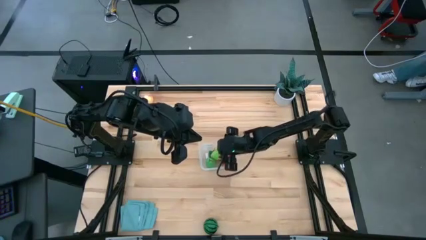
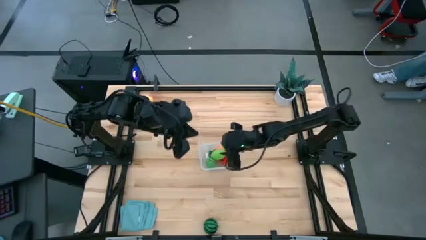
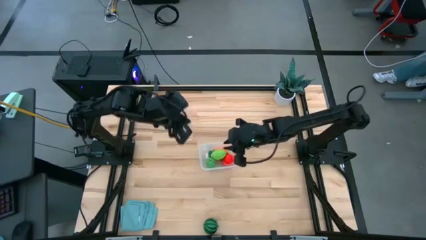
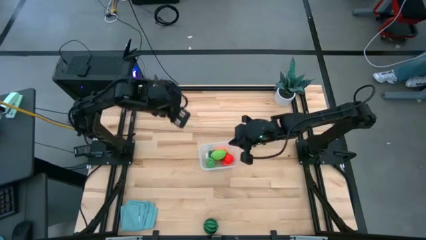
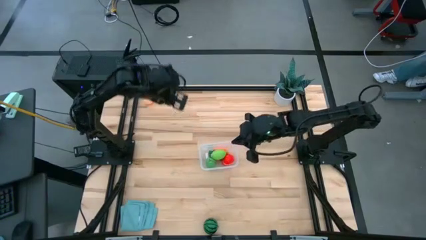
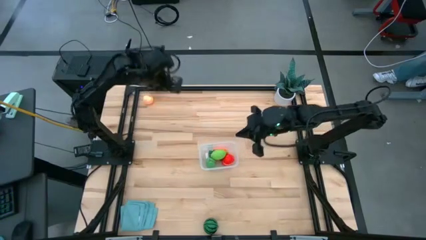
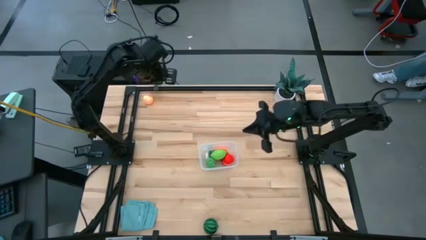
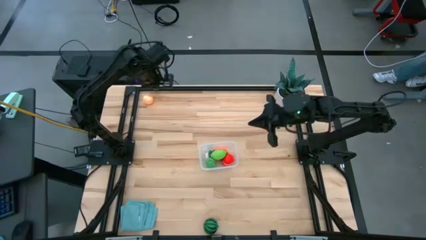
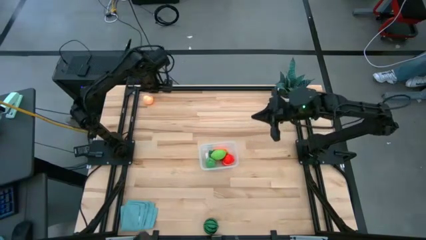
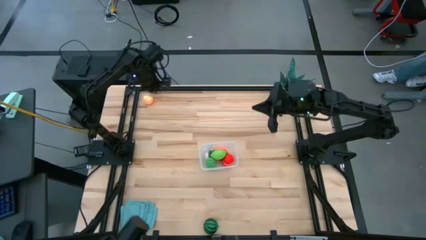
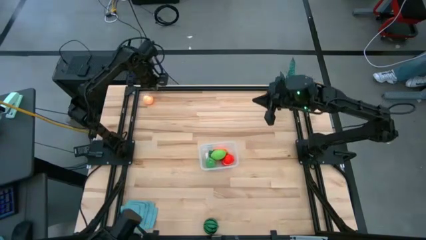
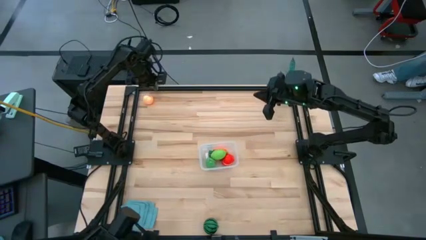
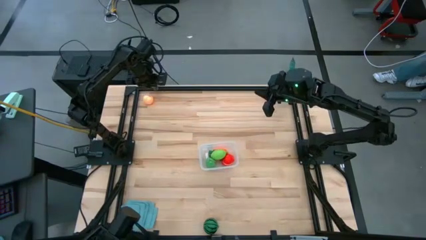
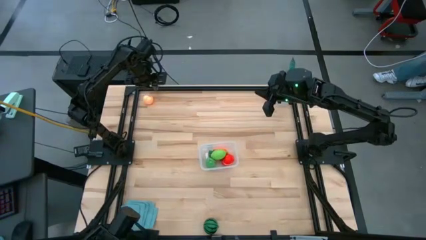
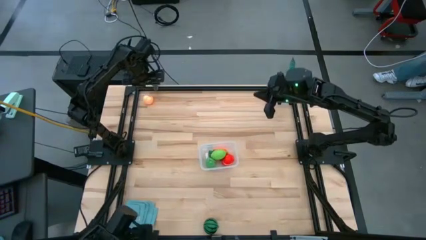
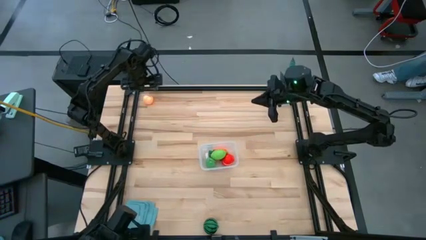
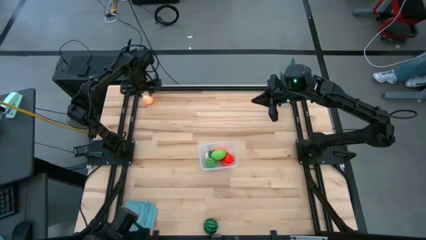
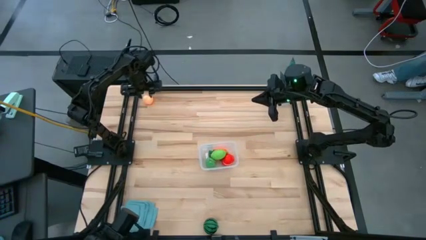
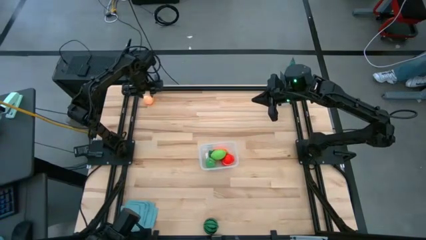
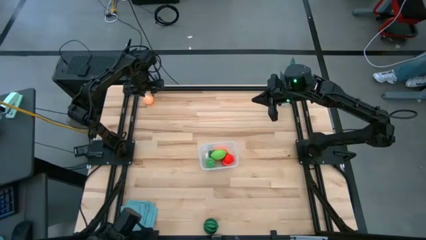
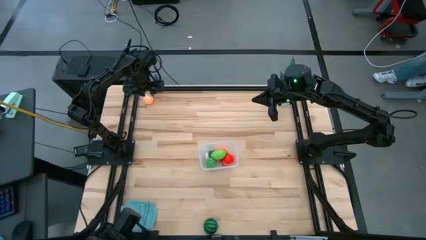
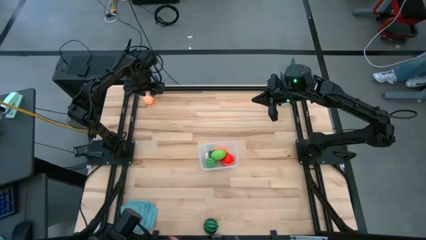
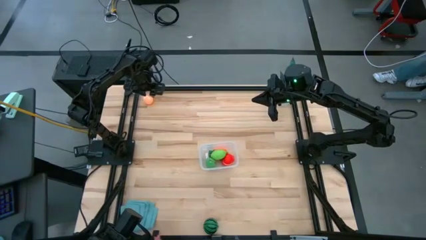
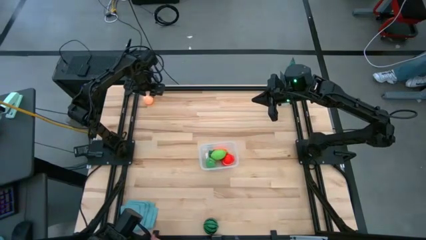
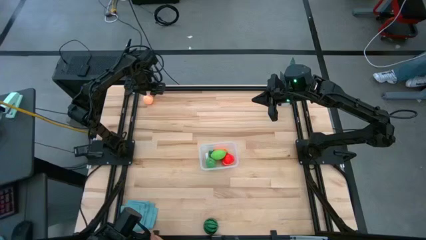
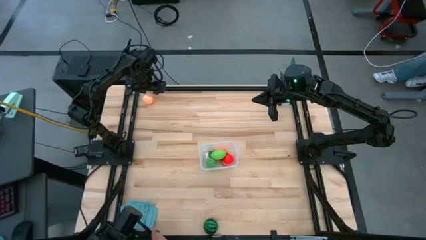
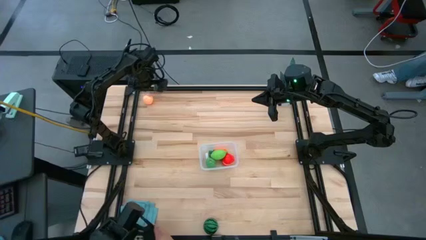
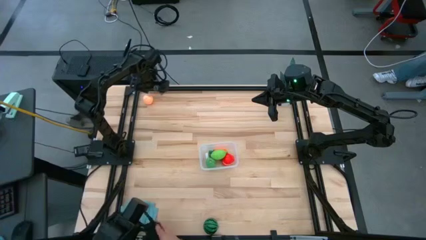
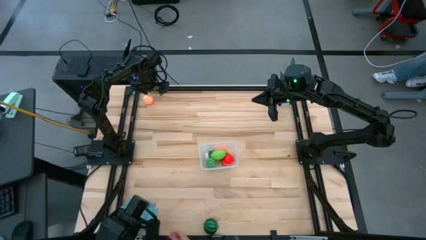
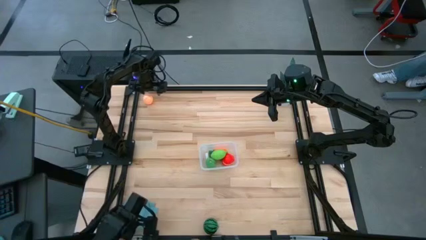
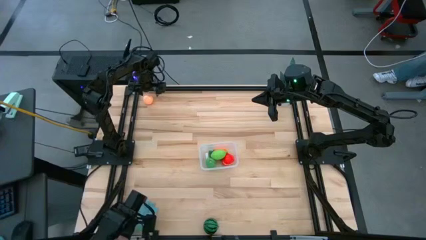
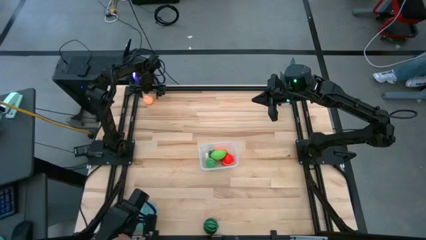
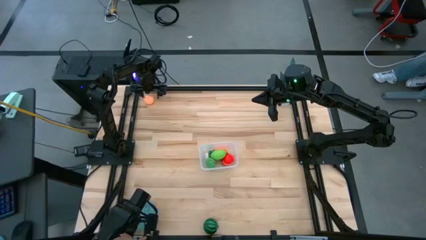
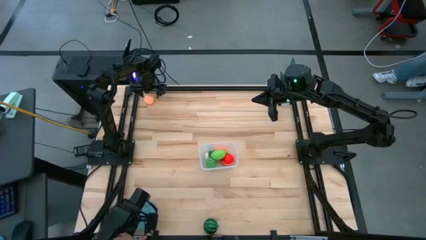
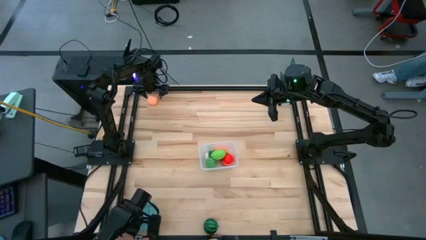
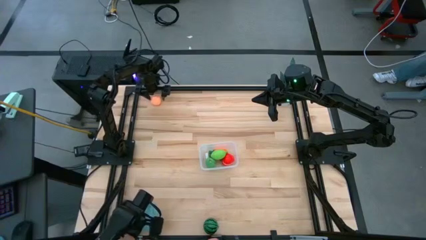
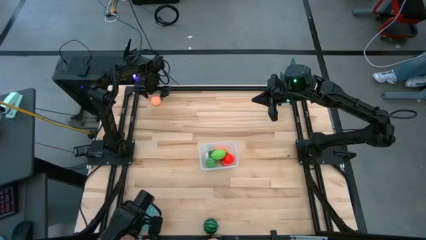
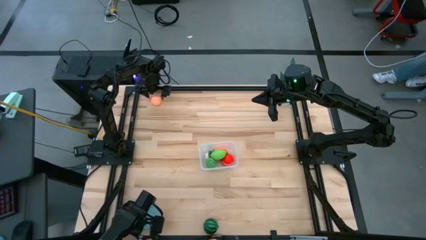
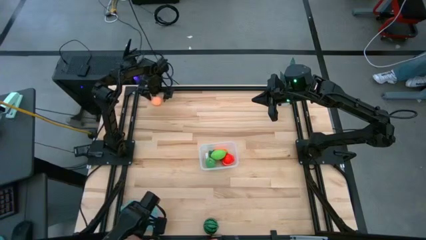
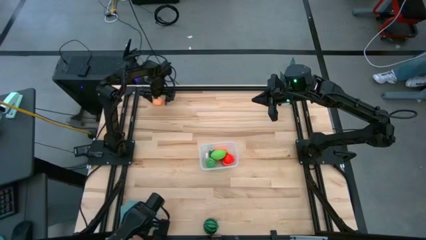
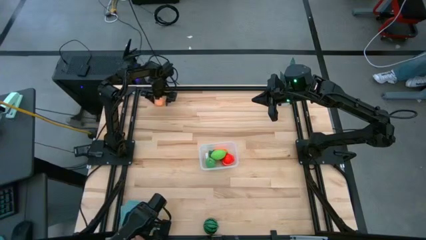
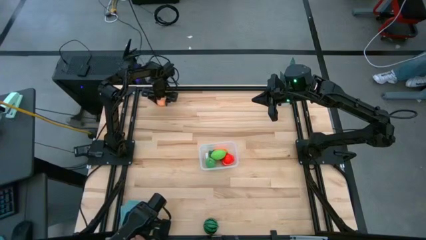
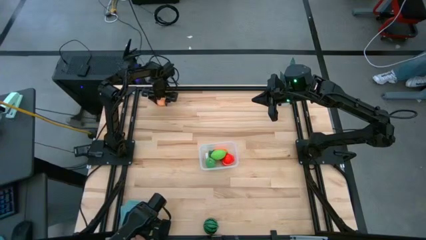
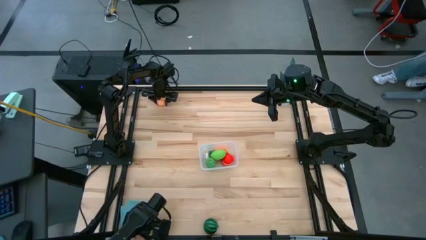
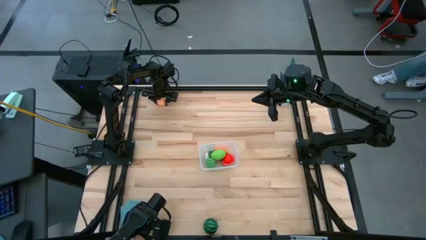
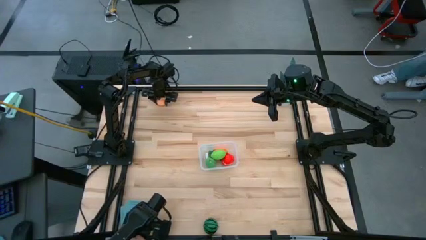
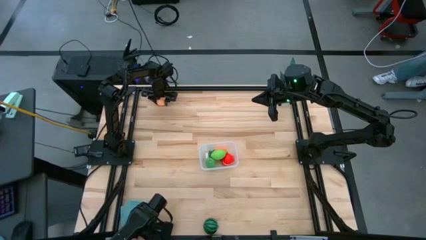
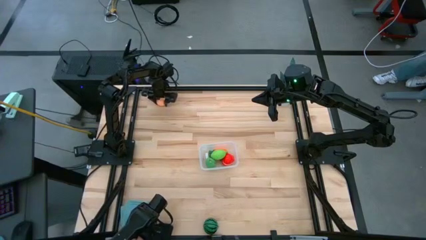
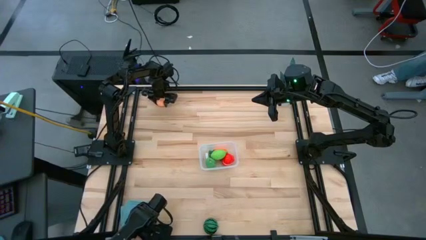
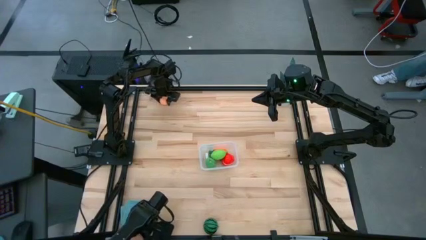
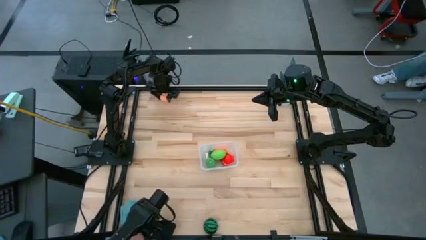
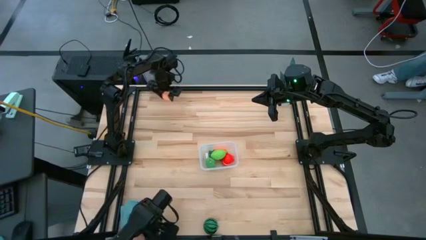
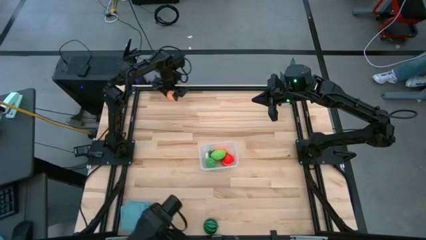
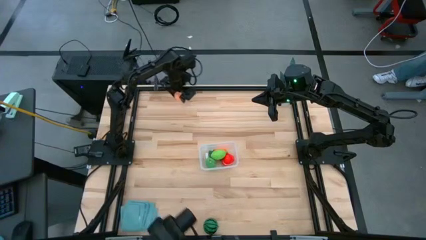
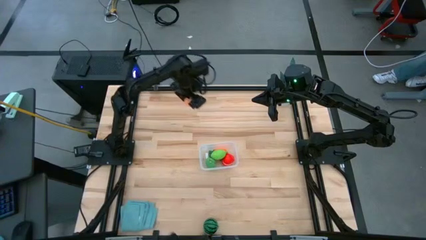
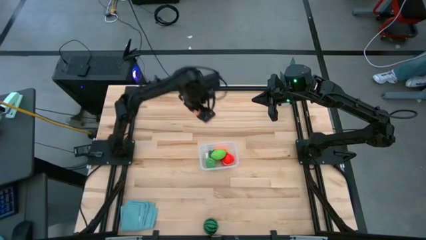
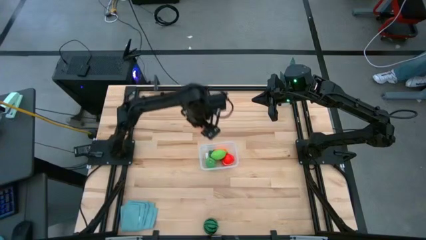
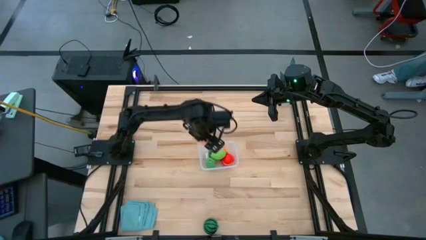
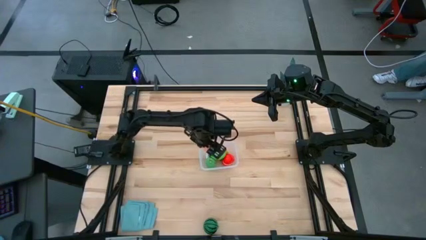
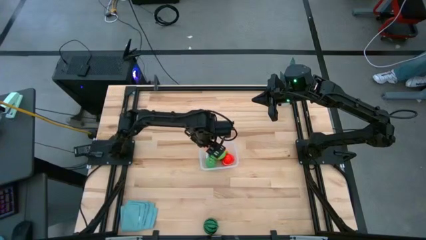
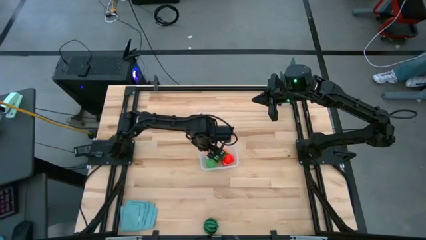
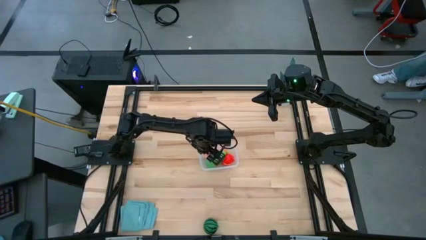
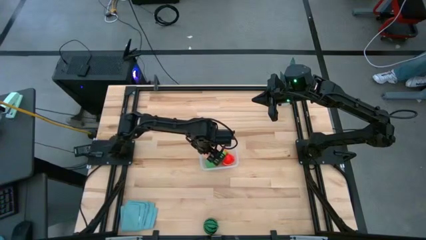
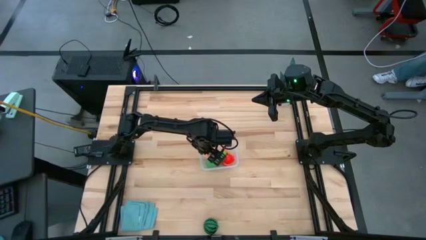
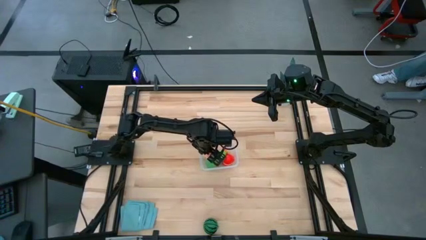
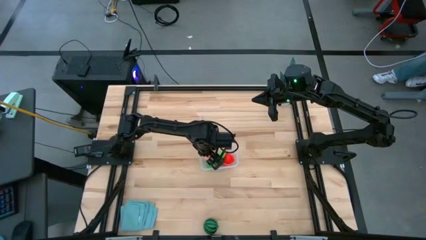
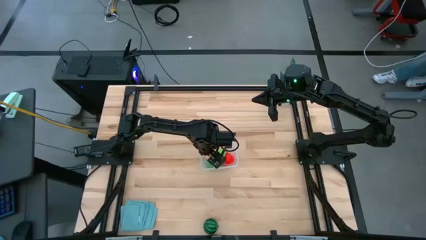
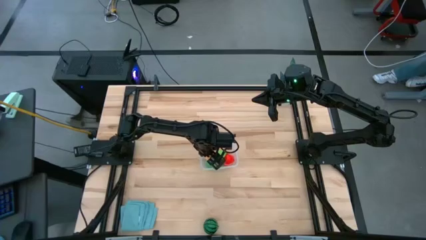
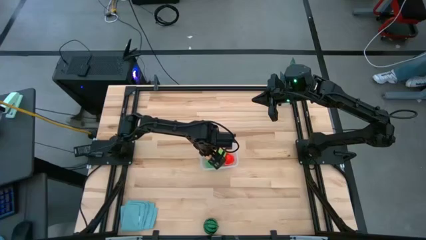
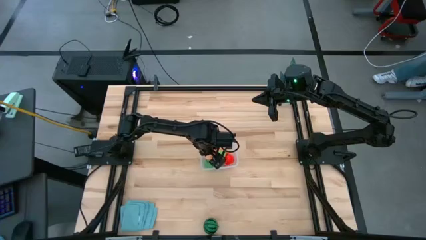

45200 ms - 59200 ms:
Task: Pick and placing Produce into tupperware
Put the pink peach into the transparent bin

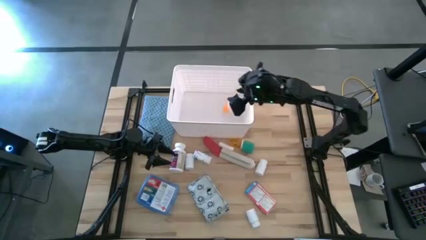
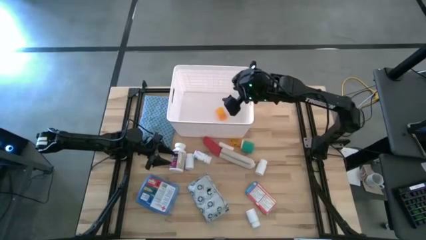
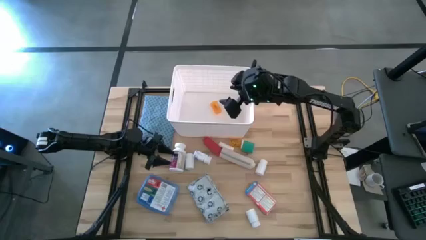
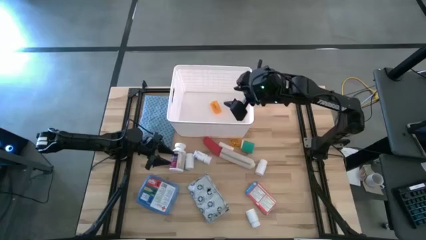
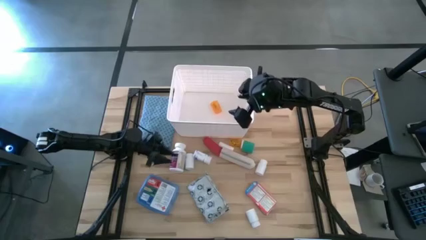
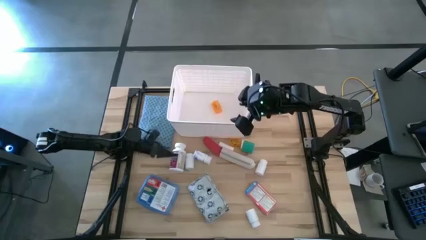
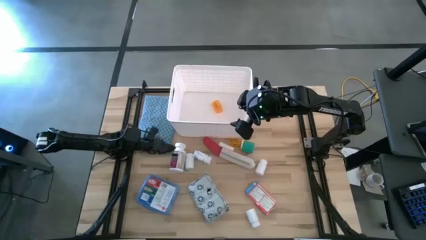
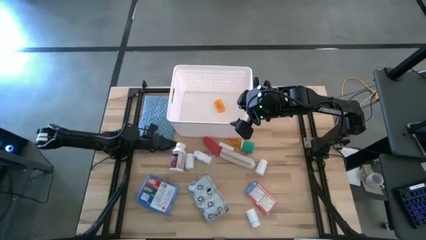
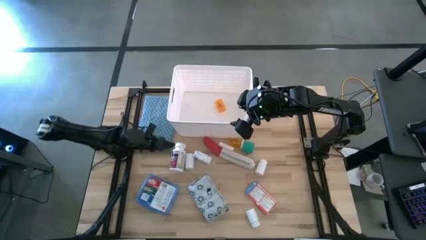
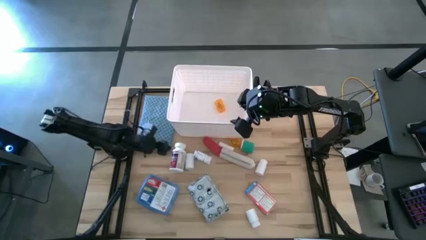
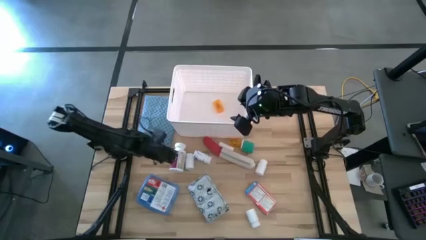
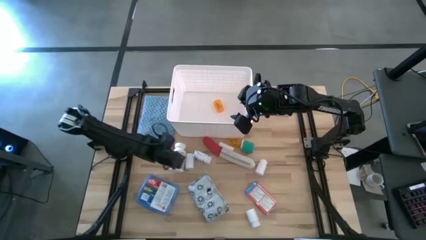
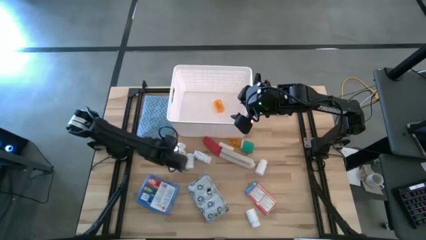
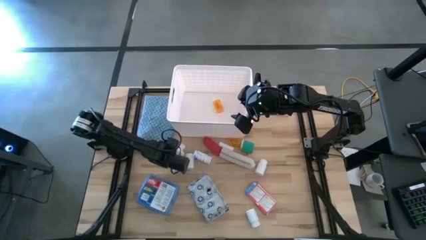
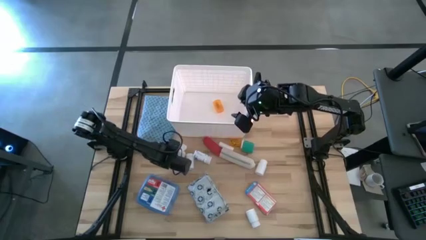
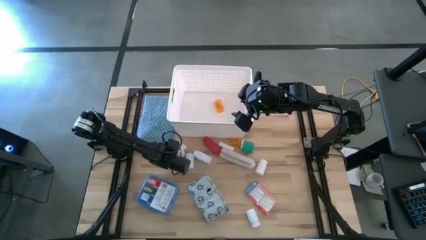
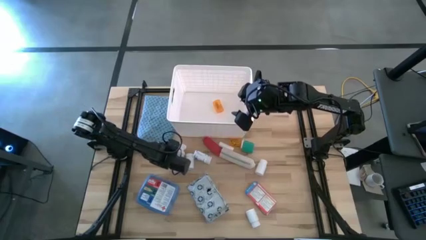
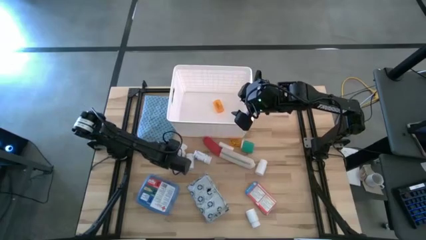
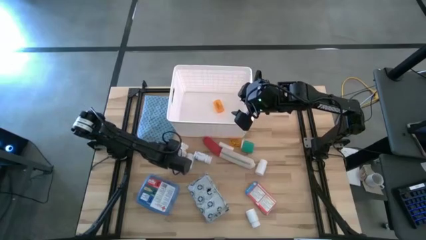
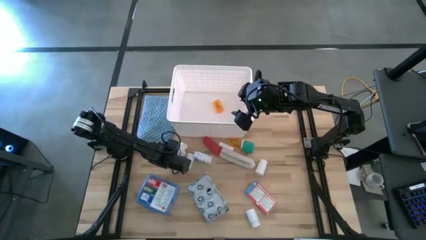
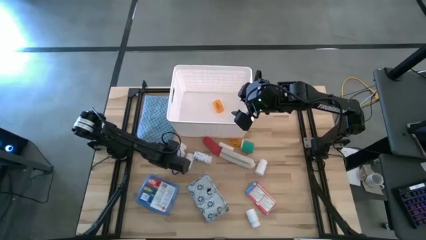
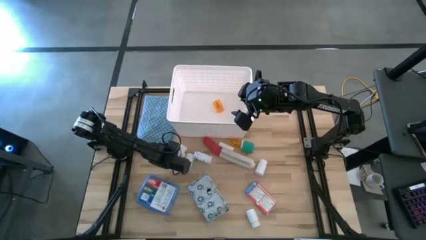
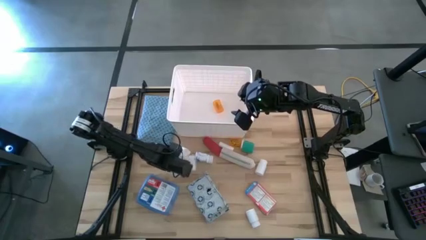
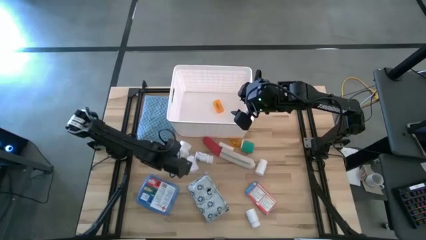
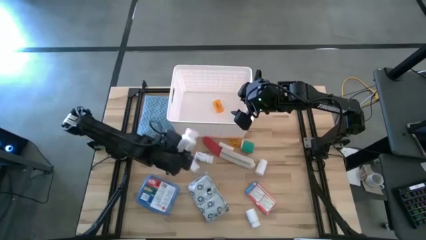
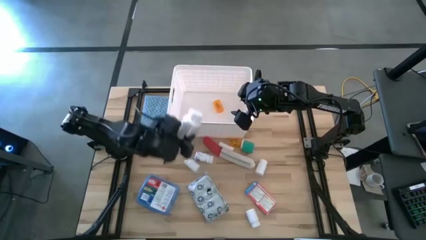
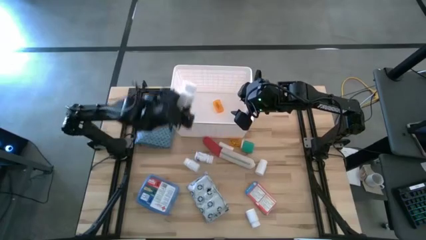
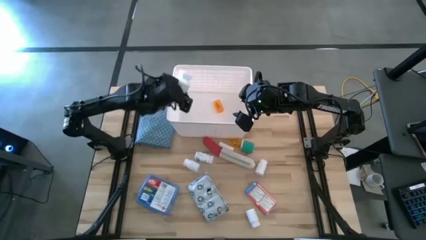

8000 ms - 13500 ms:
Task: Pick & place medical supplies in basket/bin
Put the white and violet medicine bottle in the white bin
